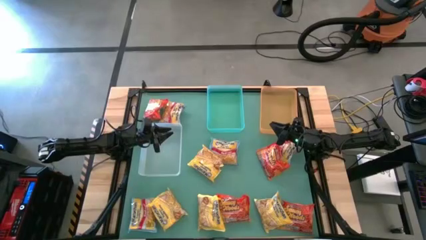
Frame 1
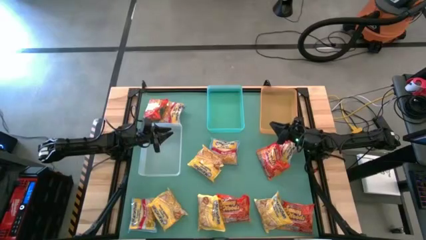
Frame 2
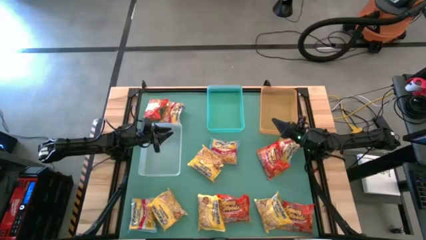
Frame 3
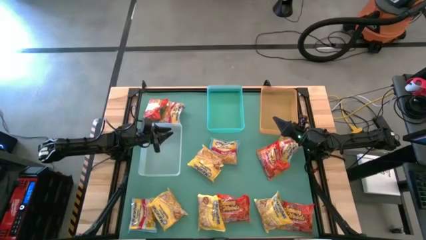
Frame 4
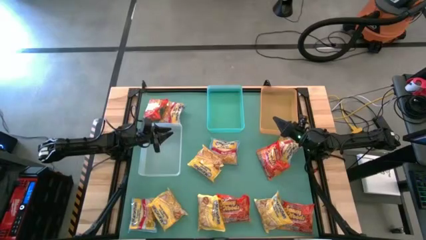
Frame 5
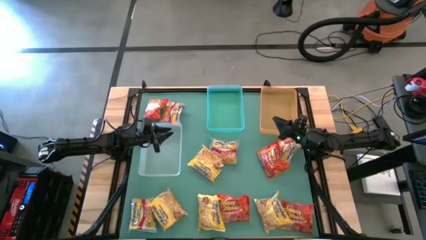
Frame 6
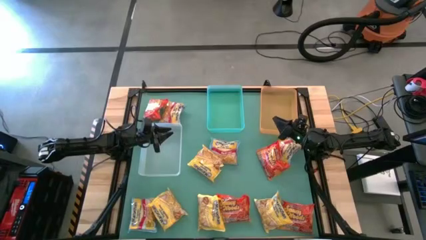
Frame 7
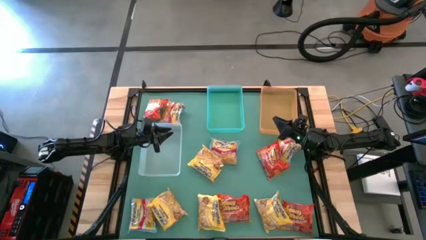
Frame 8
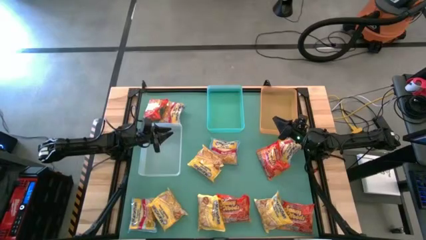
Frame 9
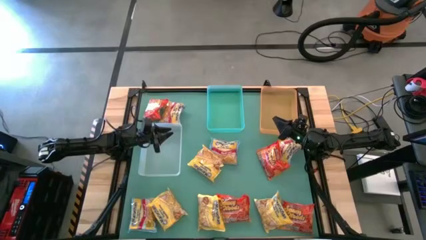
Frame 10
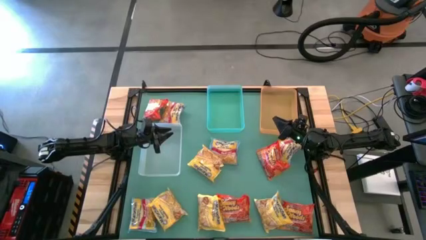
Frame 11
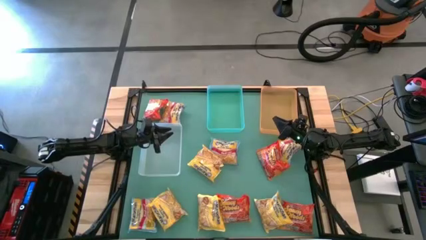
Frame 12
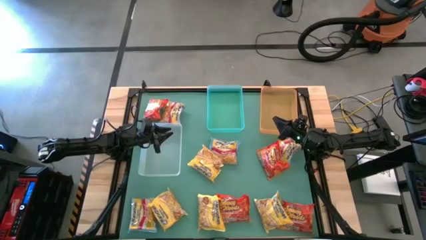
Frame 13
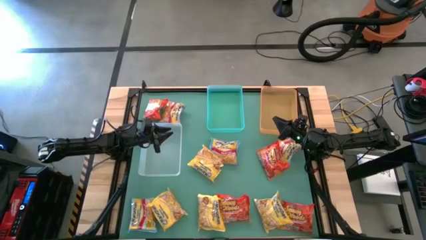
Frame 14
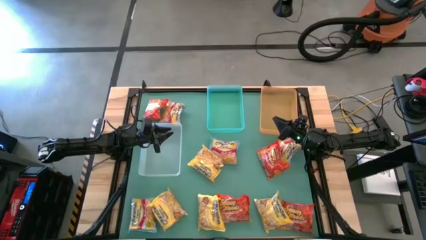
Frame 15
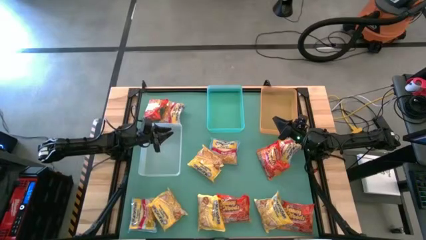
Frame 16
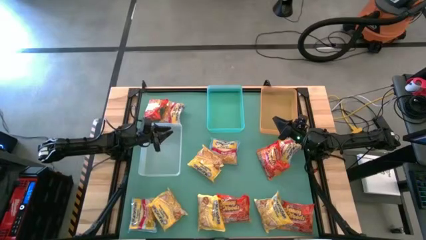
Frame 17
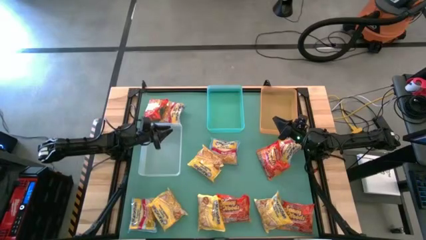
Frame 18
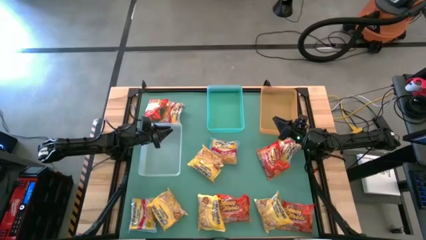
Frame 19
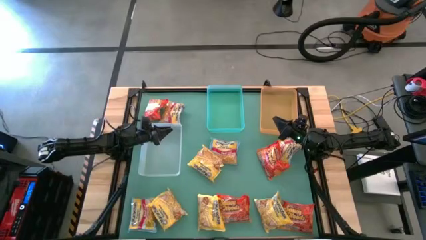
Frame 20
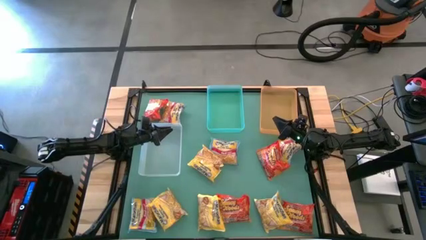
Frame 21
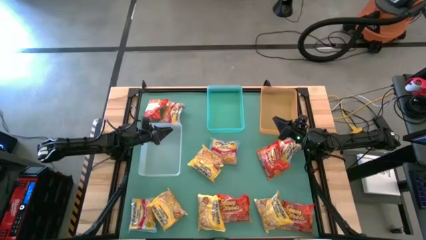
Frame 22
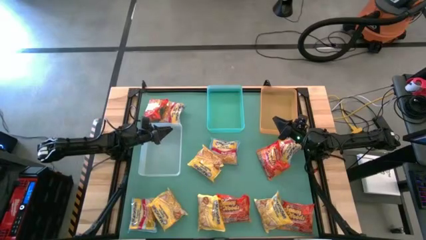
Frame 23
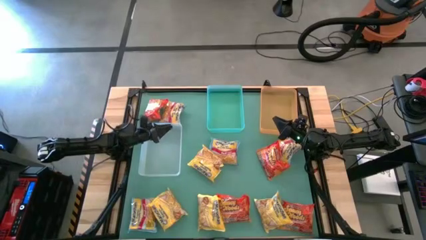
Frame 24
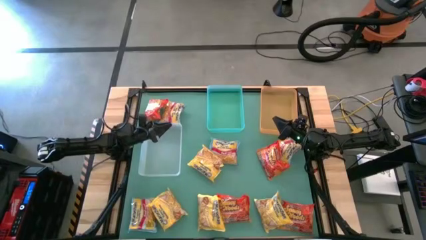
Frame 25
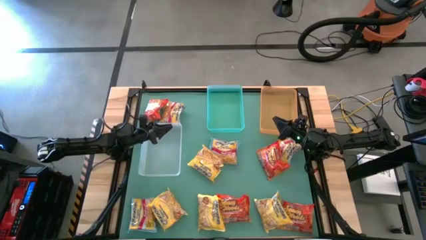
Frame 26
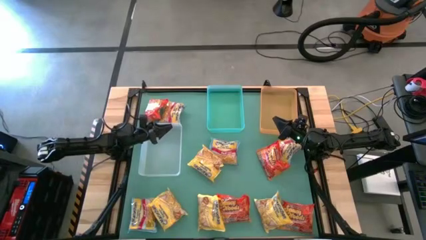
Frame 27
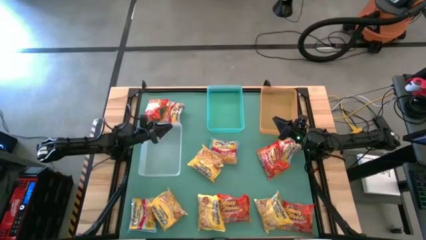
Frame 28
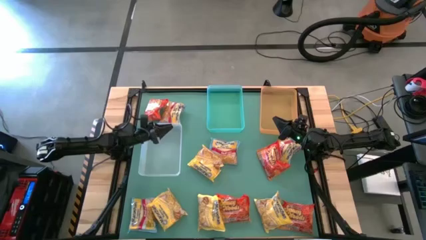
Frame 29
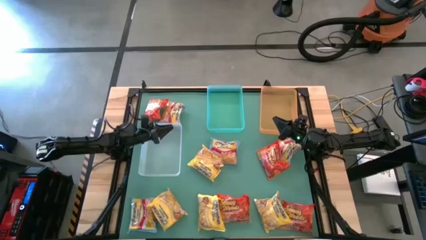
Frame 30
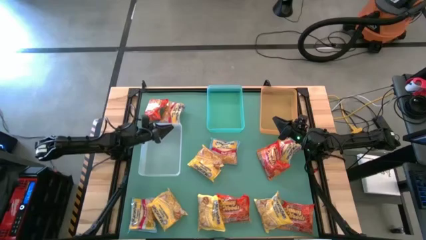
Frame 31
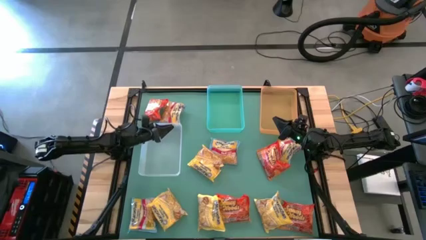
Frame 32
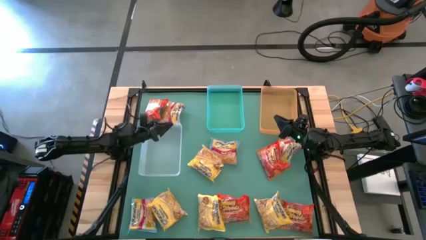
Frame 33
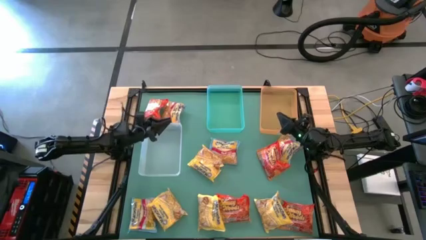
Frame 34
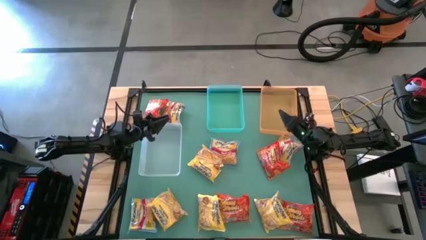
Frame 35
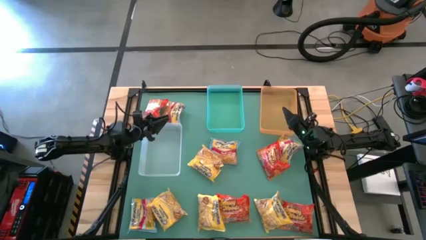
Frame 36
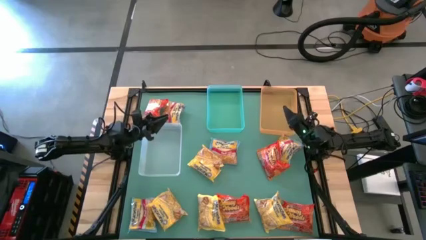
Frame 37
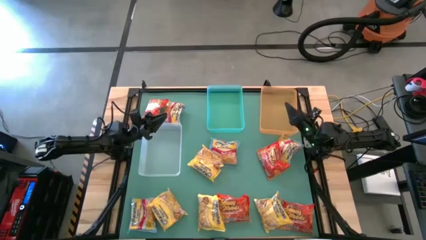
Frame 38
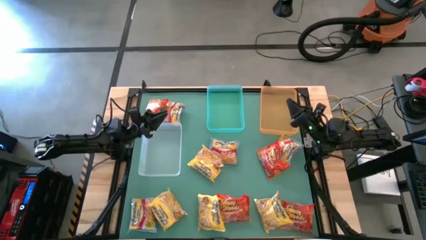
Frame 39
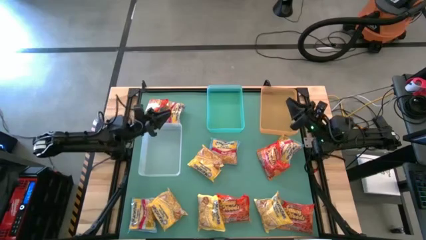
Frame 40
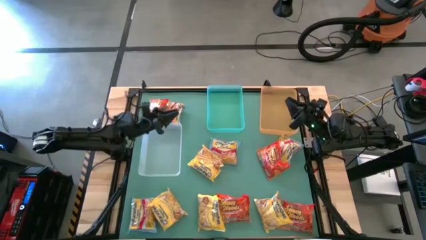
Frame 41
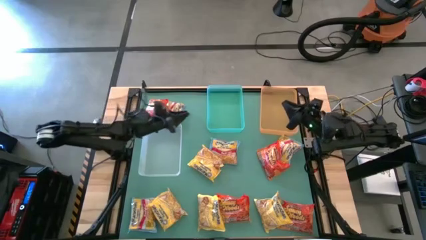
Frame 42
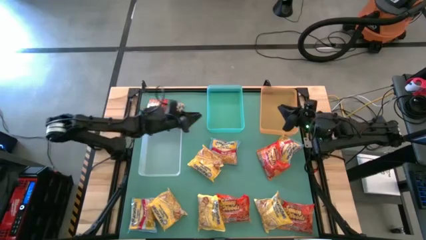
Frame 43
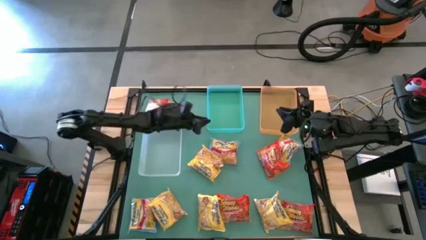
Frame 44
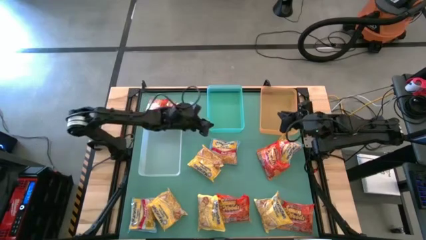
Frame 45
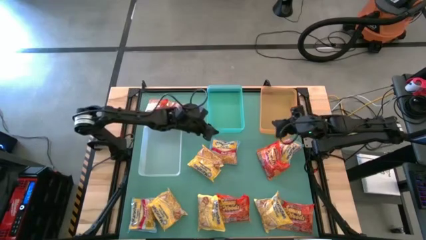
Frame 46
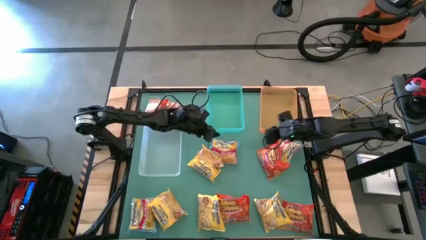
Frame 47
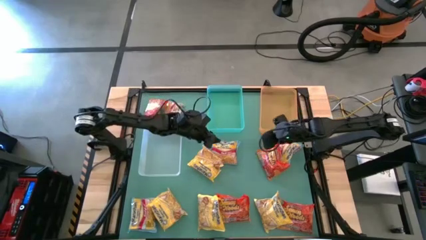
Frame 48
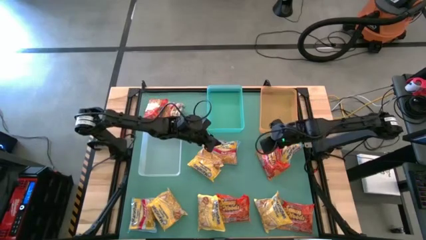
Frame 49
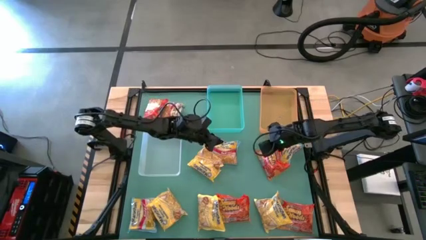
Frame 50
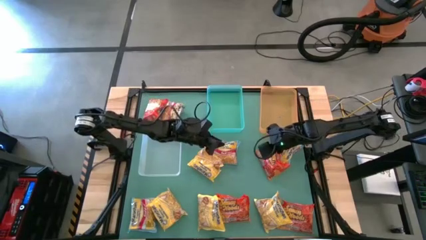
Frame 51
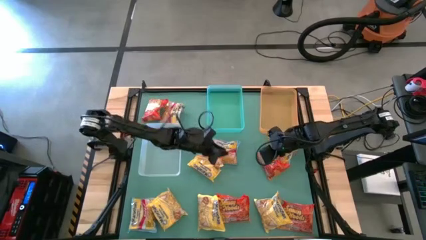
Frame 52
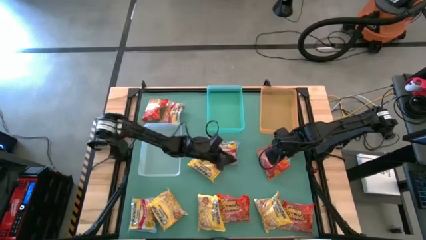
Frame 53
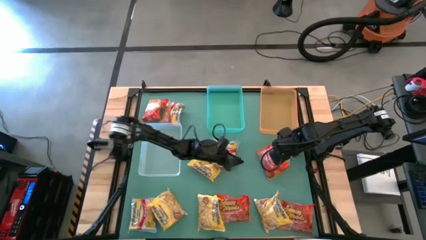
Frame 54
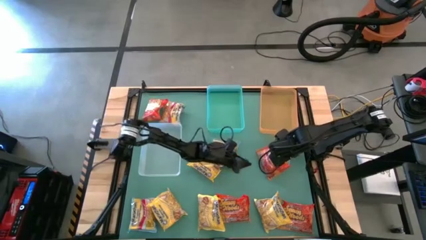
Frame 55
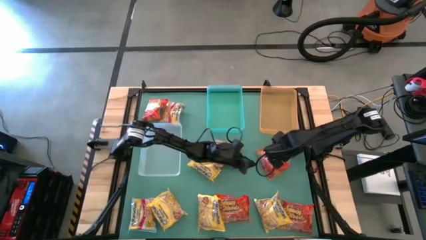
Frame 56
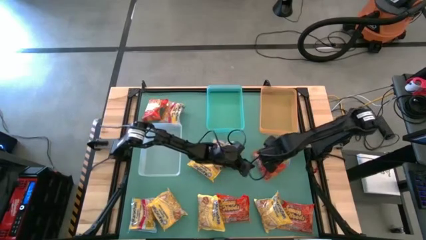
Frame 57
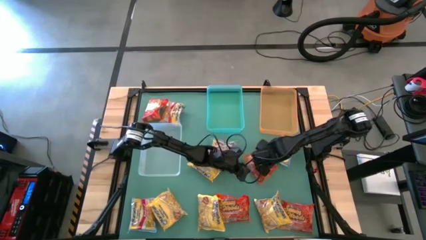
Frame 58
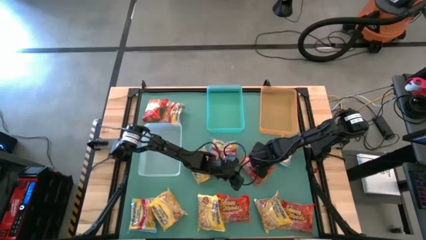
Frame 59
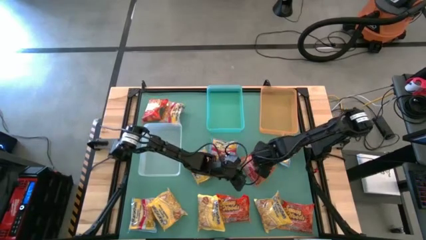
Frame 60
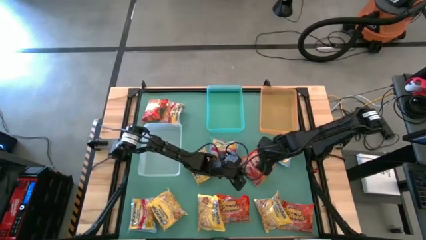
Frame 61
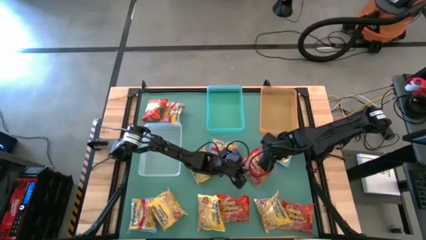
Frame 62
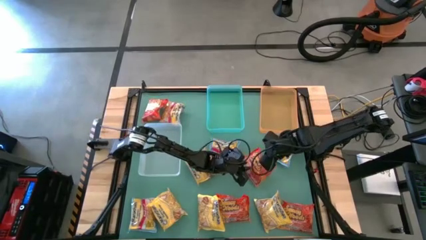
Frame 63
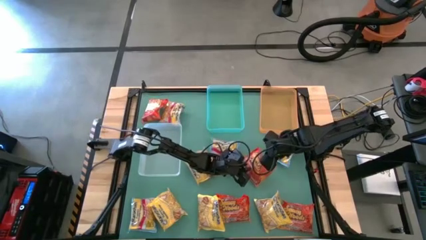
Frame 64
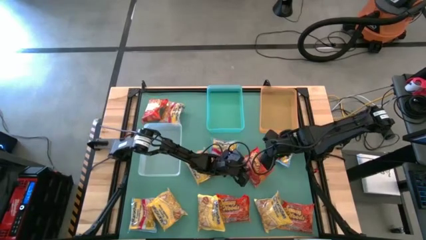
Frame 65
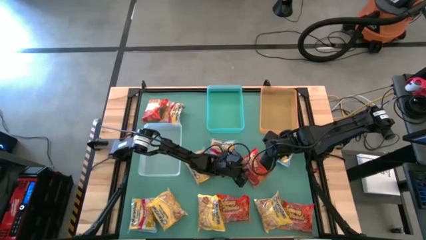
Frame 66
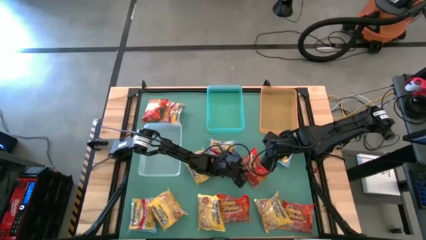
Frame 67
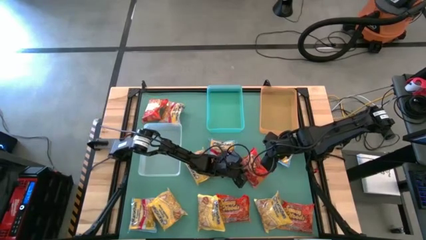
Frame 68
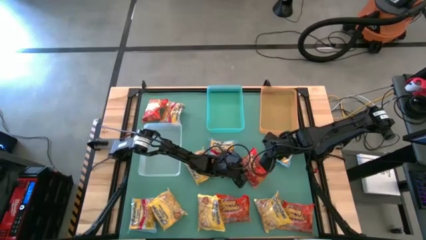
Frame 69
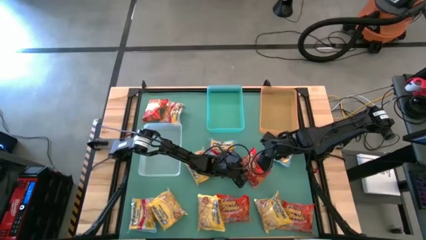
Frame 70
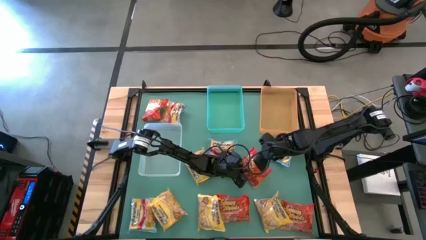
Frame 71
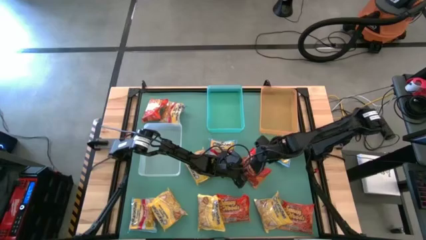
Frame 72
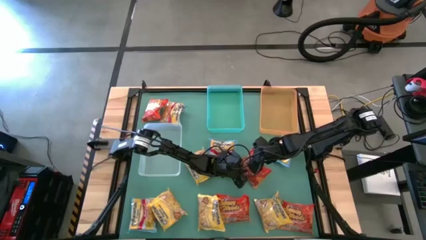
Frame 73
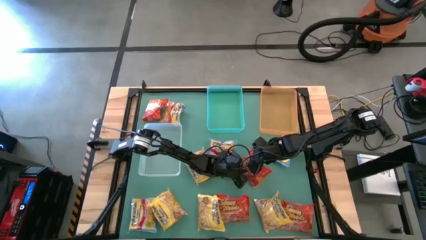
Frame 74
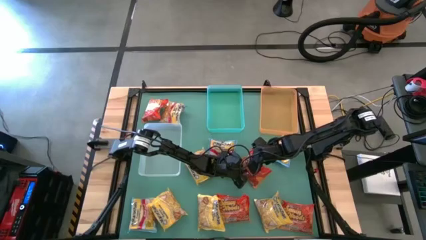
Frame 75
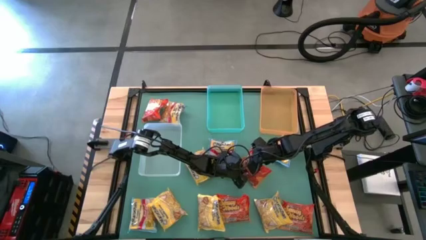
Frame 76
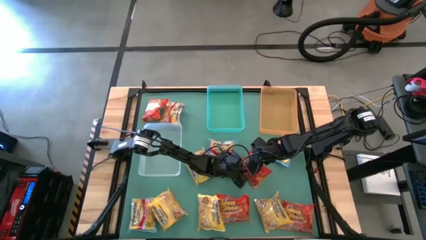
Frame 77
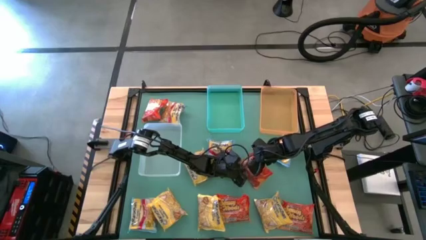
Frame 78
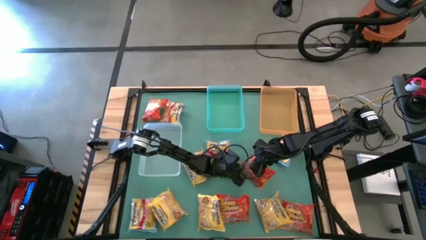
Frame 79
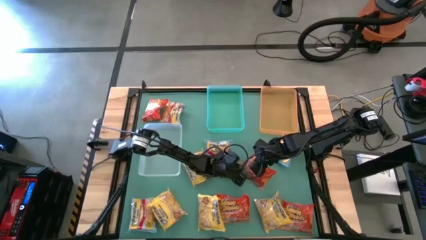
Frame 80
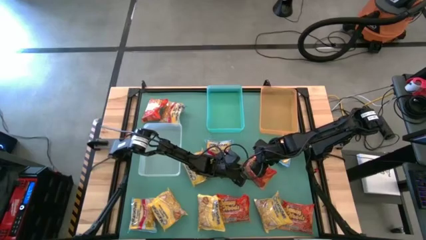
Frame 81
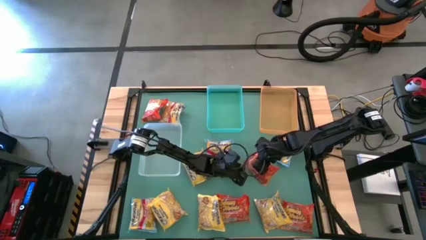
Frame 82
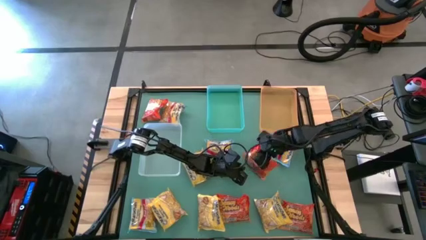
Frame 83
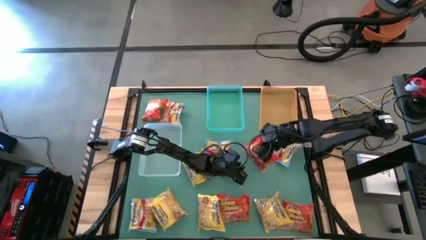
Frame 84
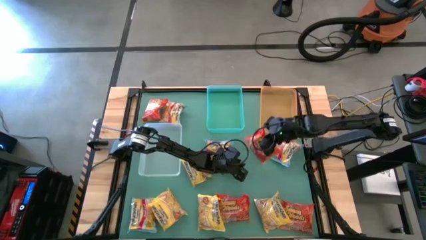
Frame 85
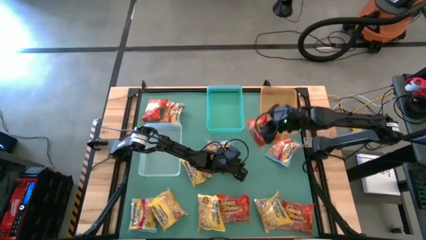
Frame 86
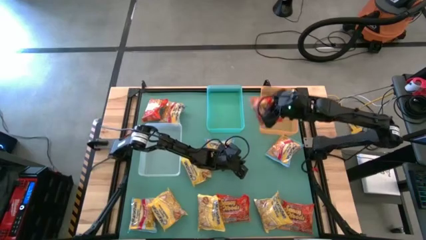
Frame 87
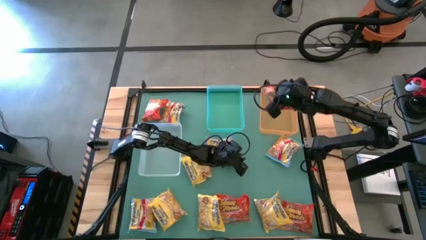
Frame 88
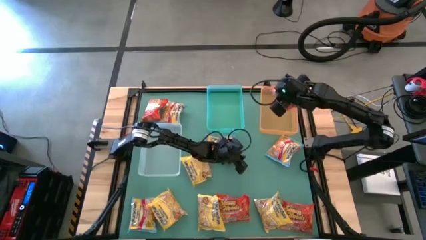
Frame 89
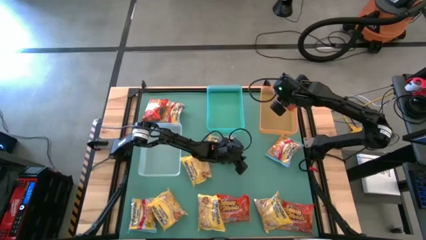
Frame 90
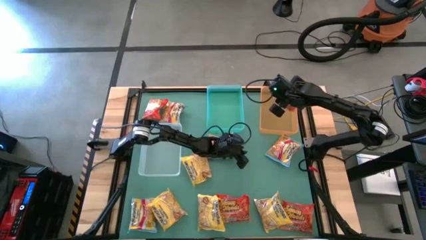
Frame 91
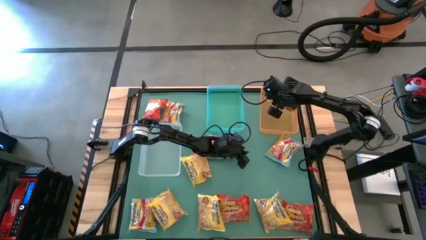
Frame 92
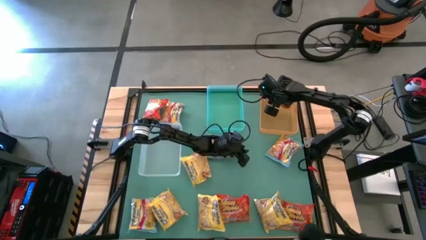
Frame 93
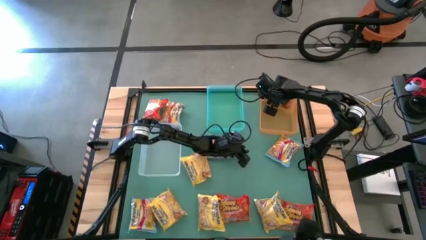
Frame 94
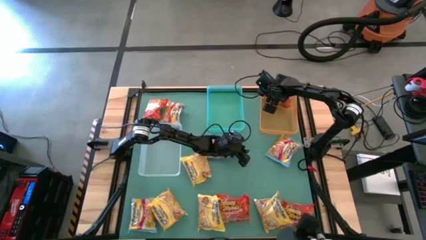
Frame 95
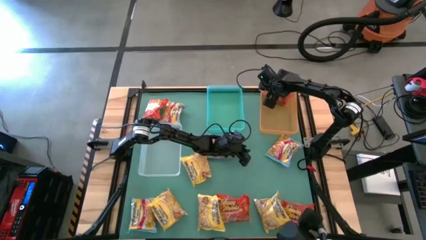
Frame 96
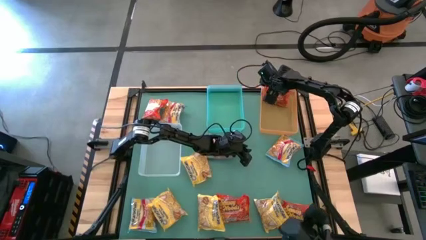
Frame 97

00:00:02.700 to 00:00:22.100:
Task: Sort Maruchan noodles
Put the orange noodle pack into the orange bin
